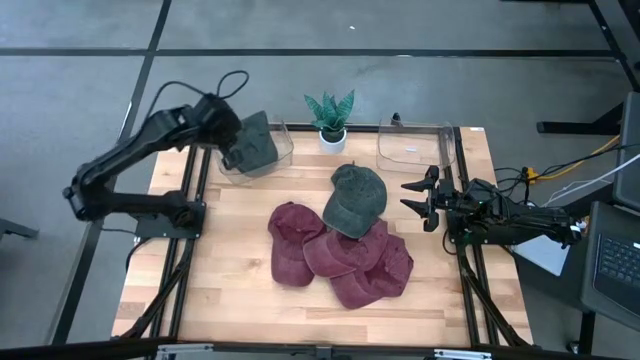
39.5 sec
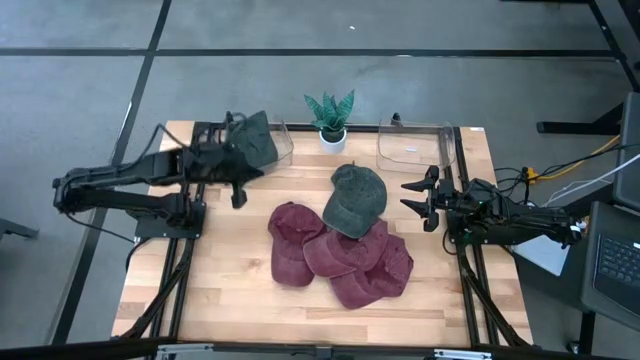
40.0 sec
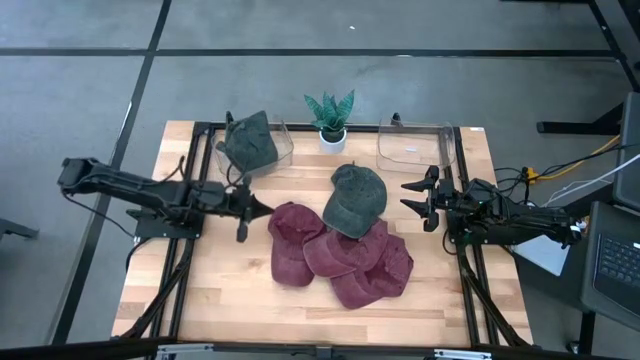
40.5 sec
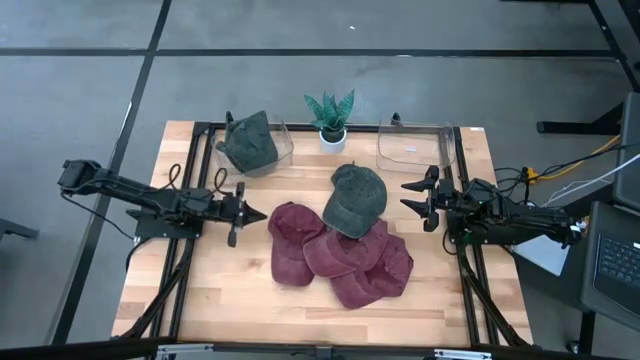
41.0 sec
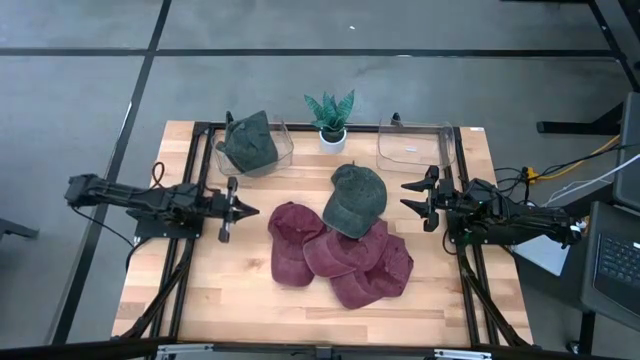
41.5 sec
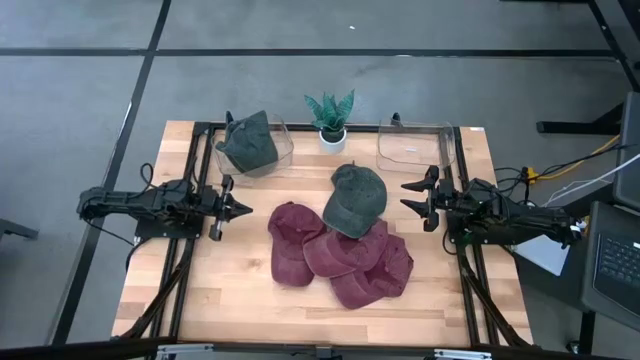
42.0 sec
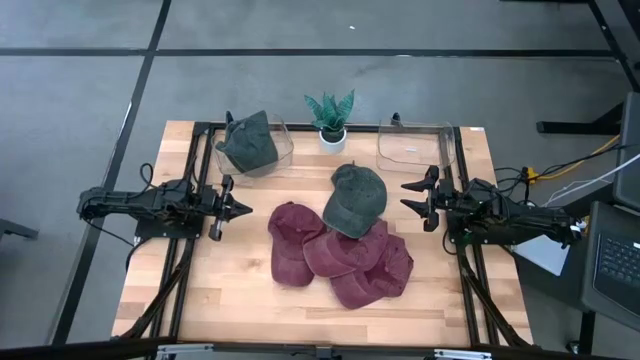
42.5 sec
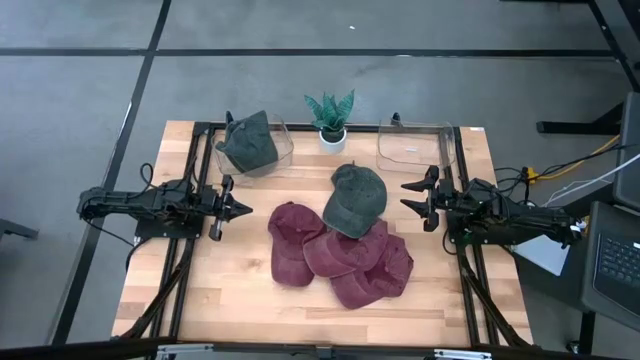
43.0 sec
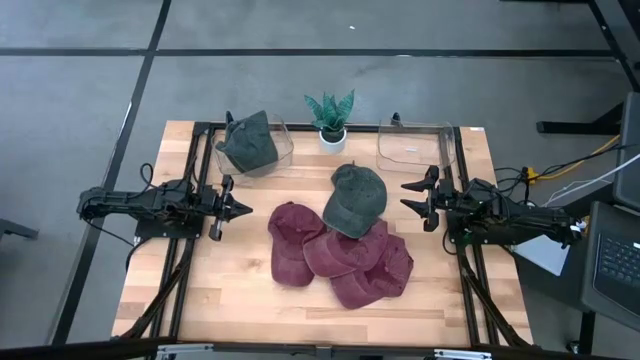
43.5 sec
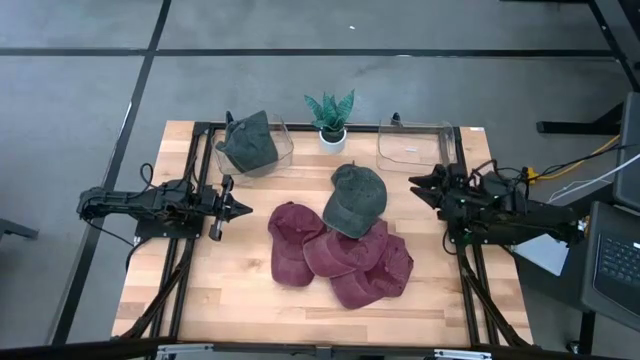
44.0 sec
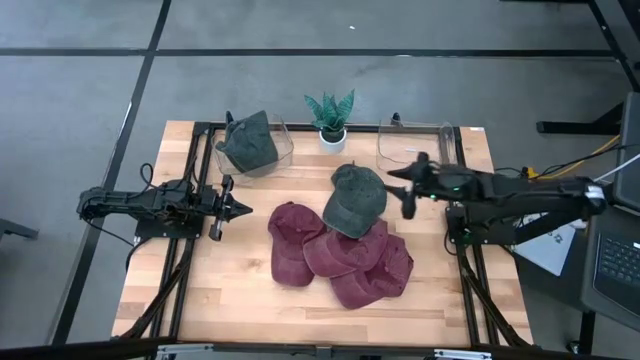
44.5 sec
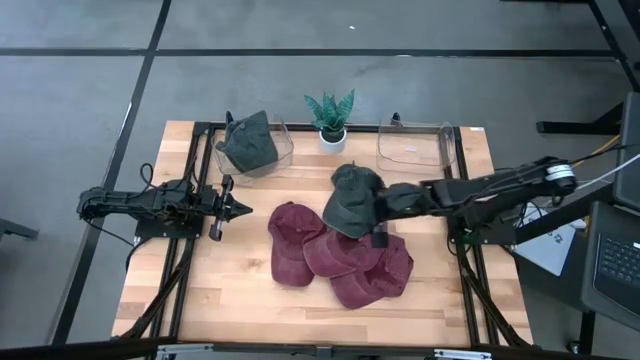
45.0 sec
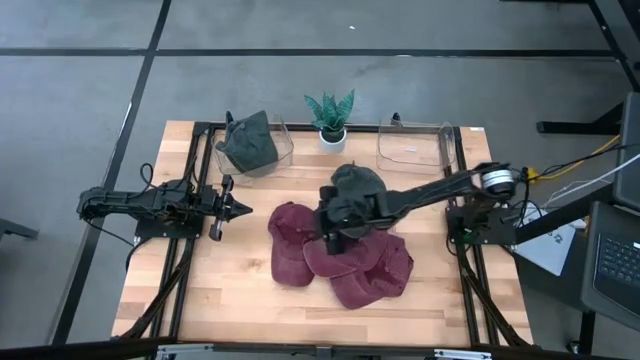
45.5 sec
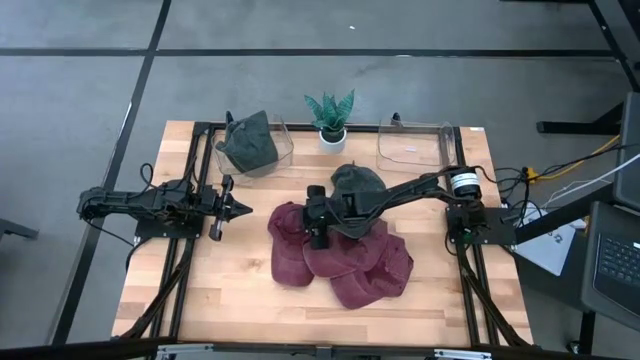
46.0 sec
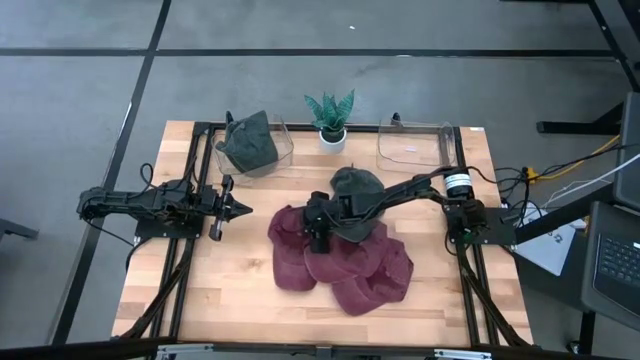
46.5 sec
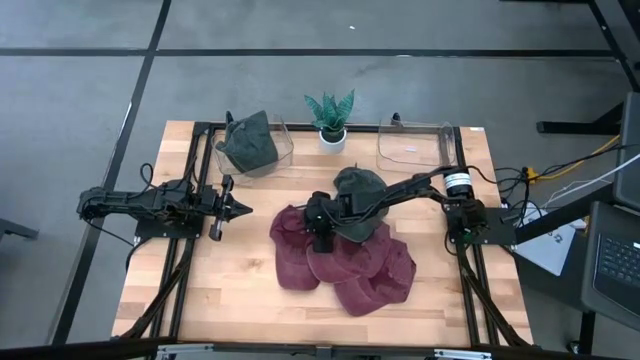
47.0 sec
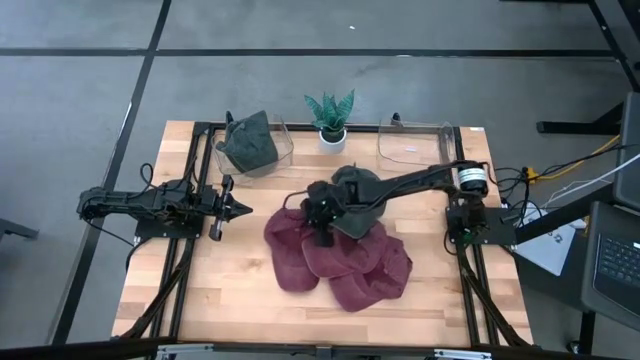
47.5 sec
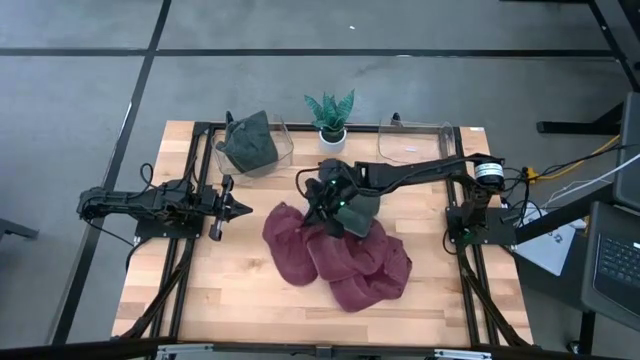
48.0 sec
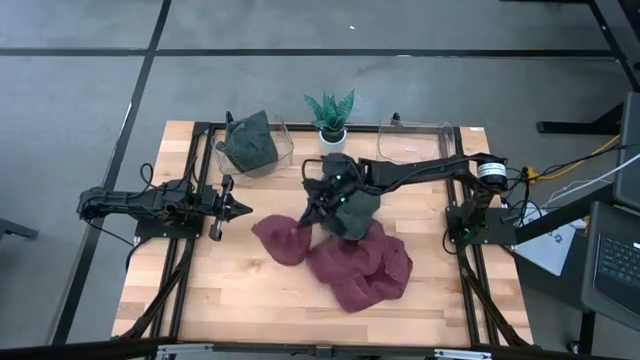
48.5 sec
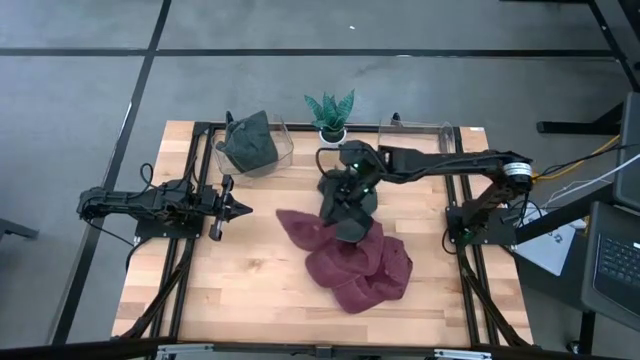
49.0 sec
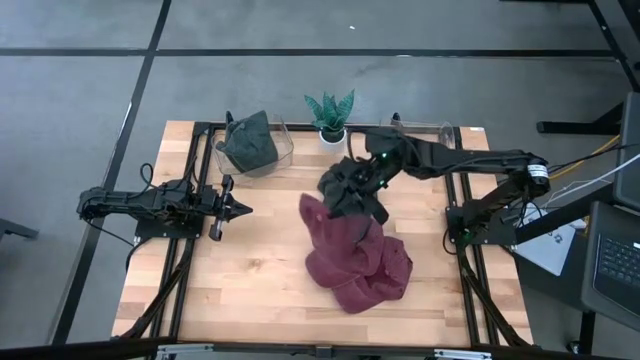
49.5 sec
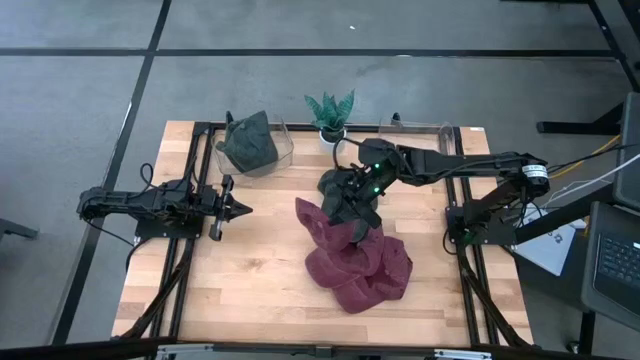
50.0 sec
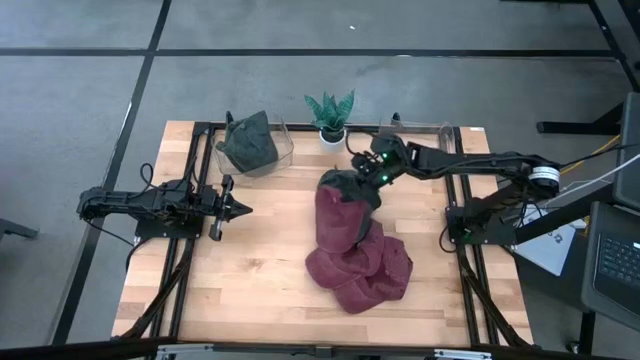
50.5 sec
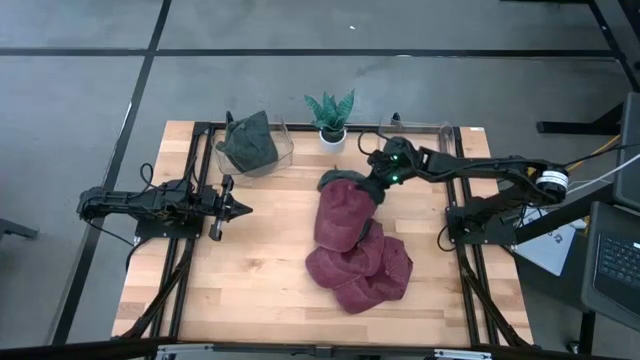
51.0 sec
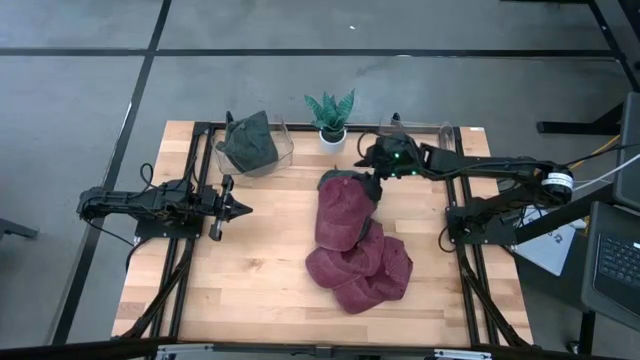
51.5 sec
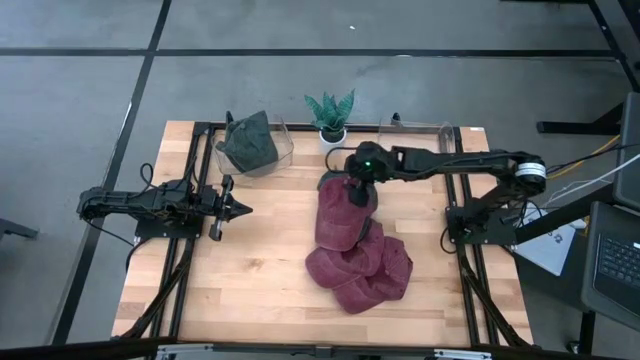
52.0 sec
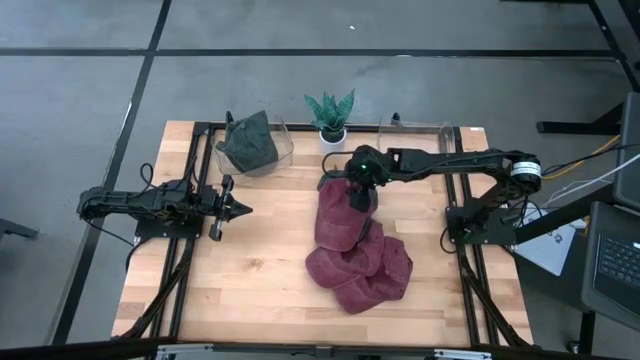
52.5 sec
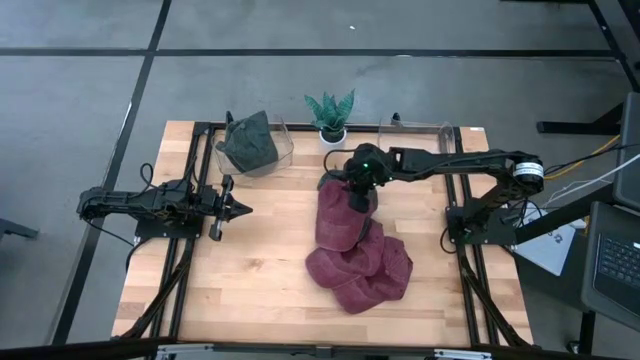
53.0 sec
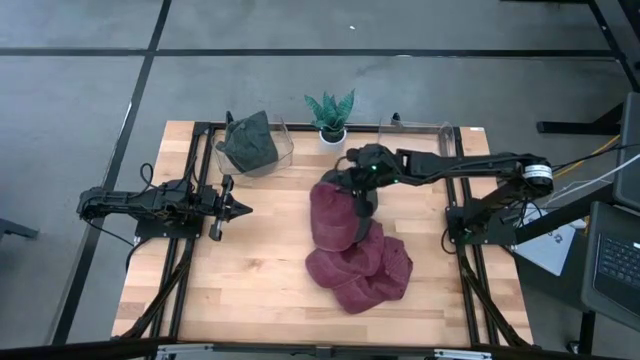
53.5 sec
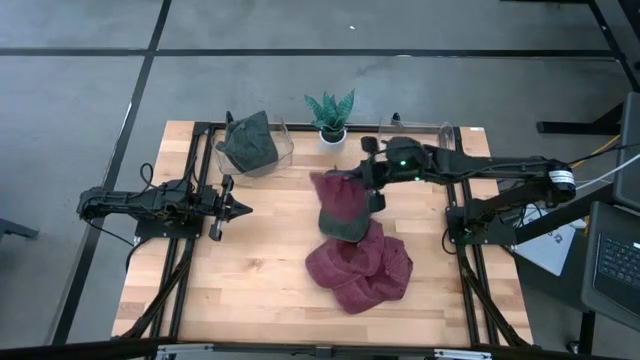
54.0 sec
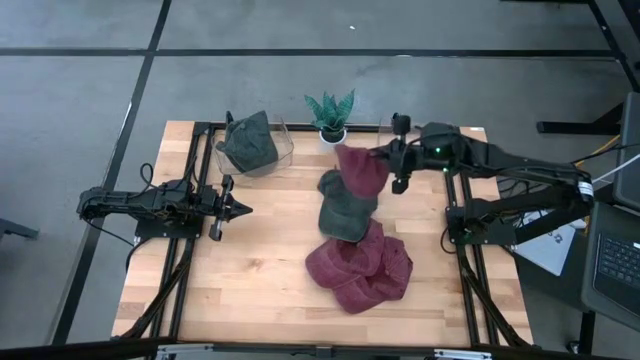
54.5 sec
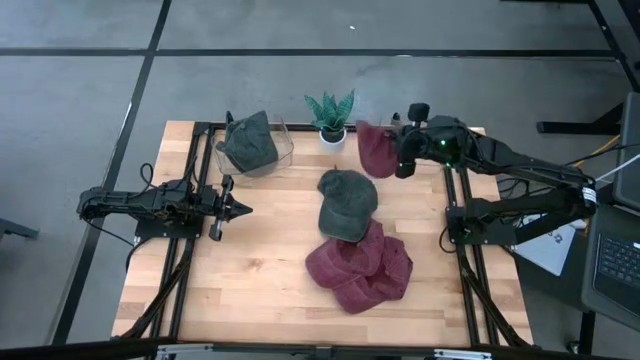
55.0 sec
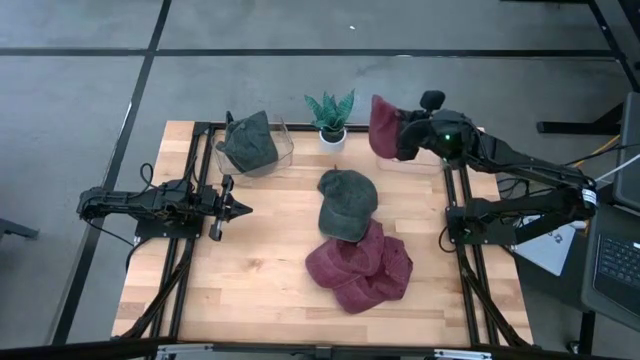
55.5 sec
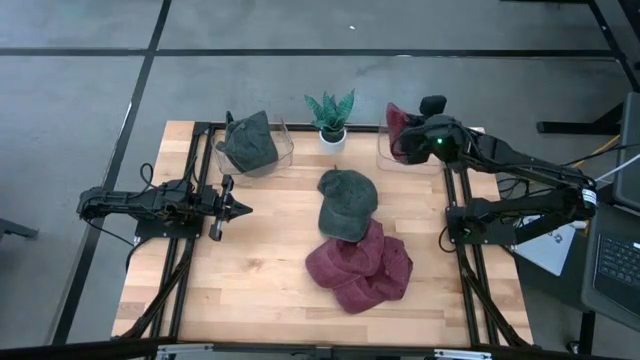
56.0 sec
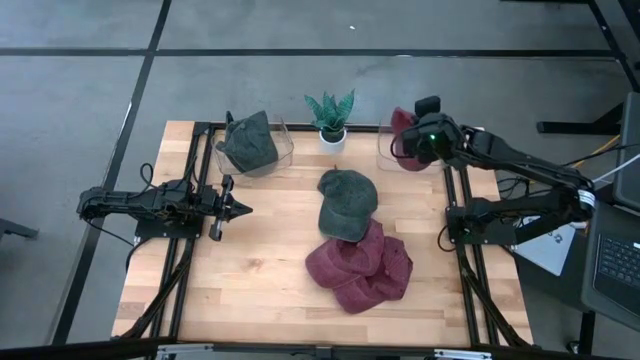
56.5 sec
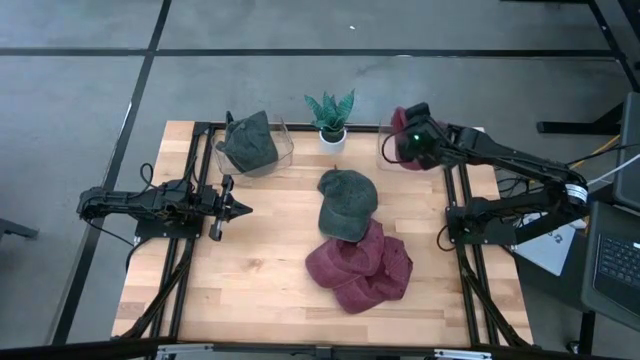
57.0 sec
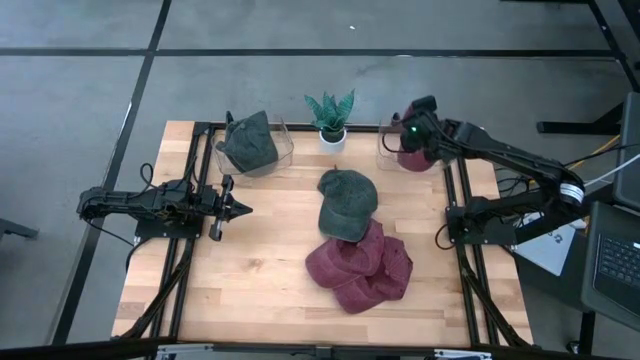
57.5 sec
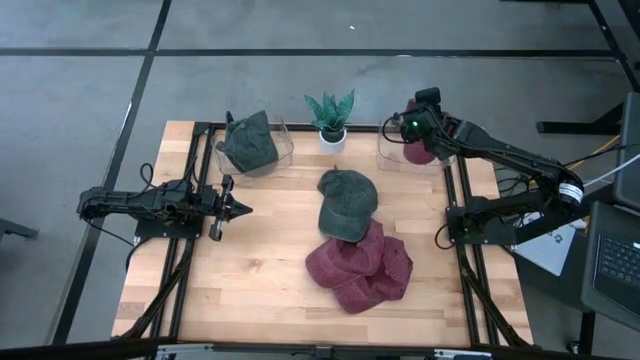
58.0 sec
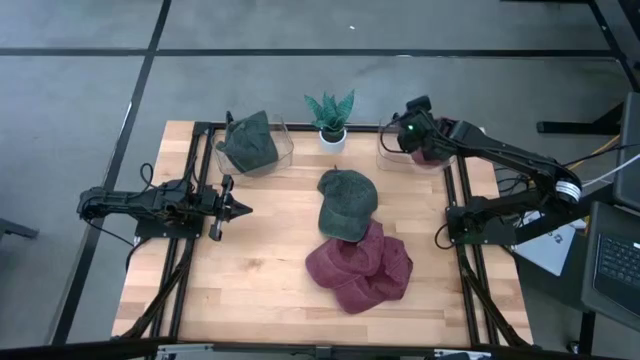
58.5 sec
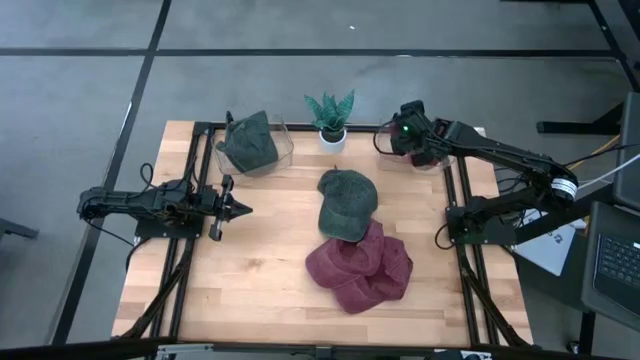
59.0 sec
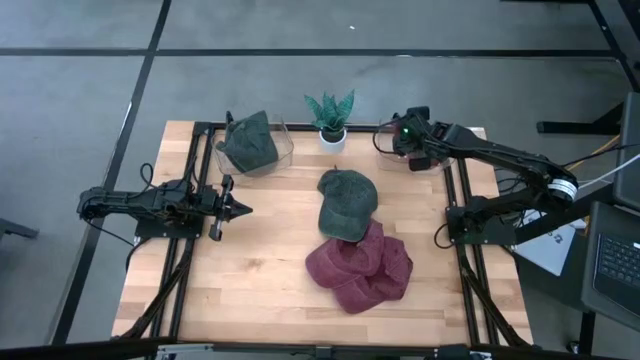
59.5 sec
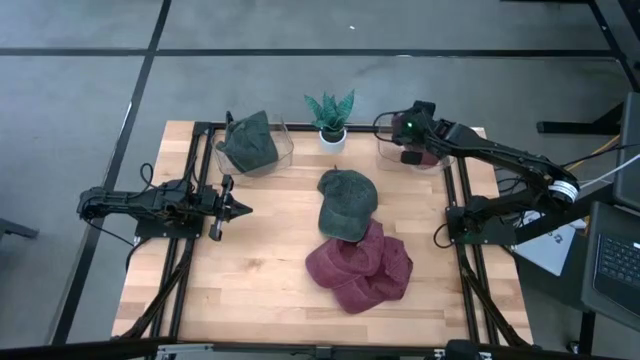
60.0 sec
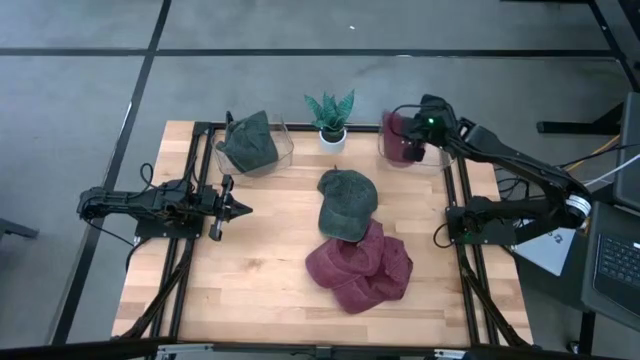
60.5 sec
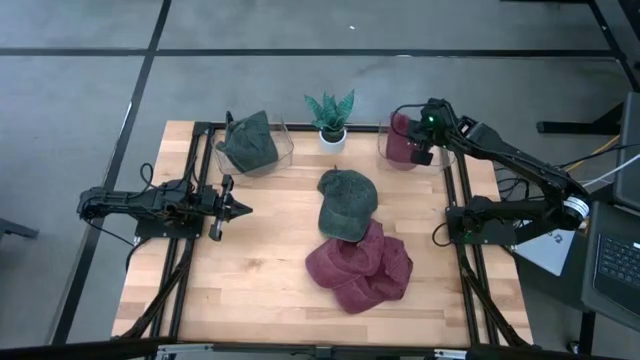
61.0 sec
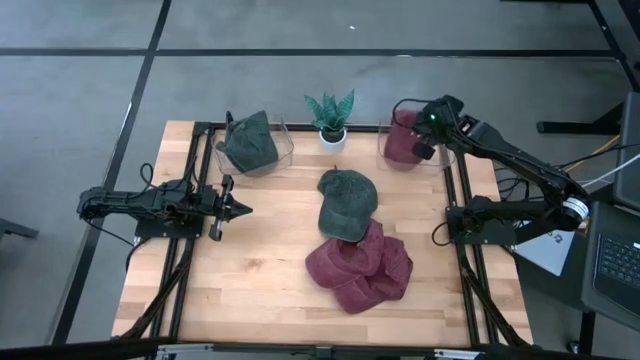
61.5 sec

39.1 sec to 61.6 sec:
Task: Pick & Place hat
Put the left red cap into the right transparent bin
